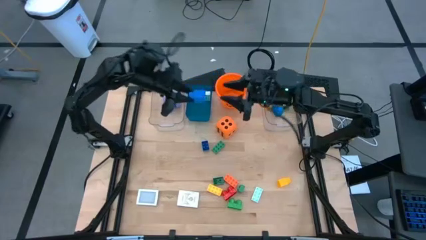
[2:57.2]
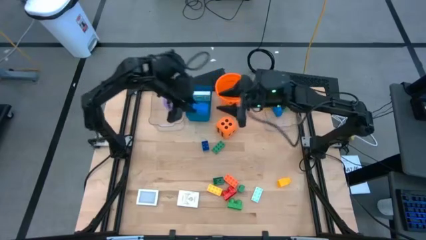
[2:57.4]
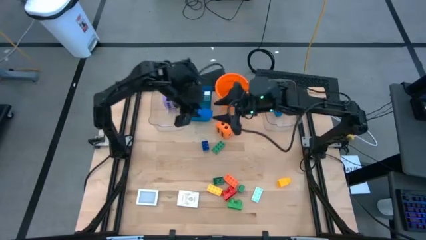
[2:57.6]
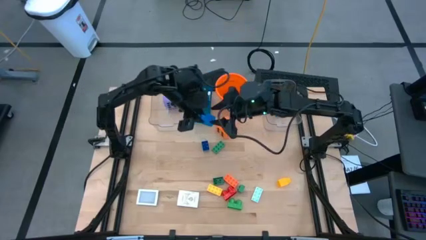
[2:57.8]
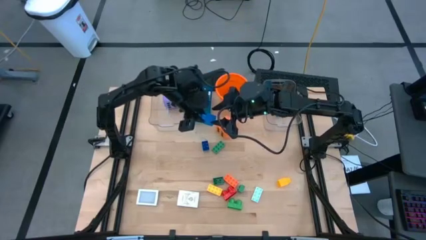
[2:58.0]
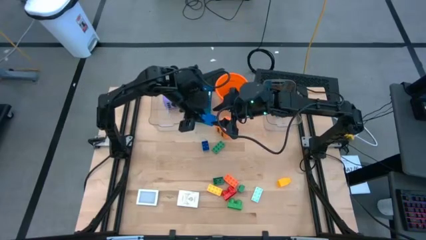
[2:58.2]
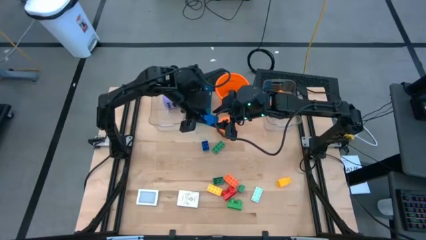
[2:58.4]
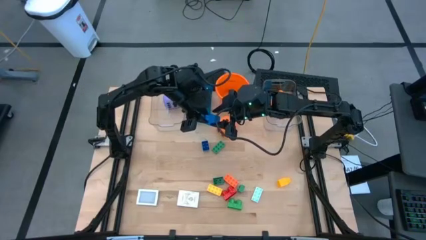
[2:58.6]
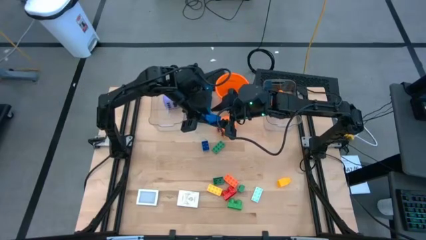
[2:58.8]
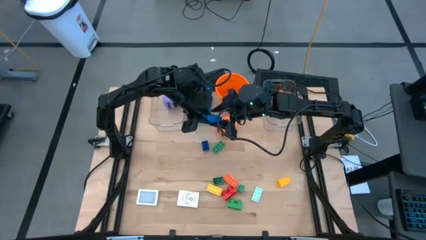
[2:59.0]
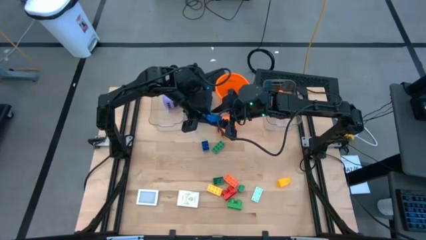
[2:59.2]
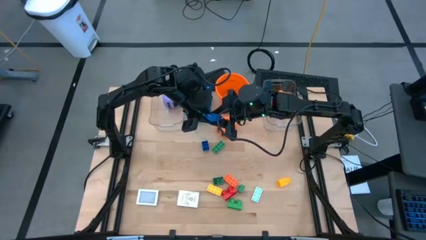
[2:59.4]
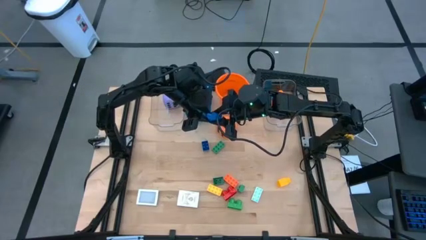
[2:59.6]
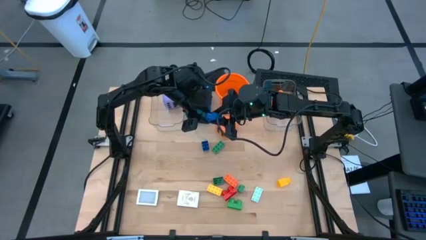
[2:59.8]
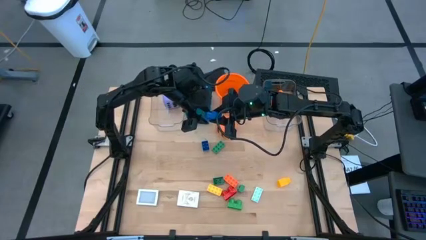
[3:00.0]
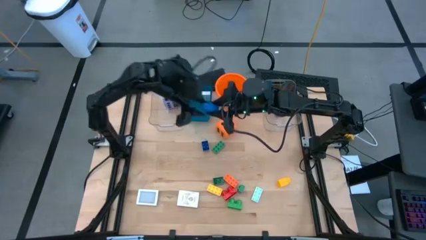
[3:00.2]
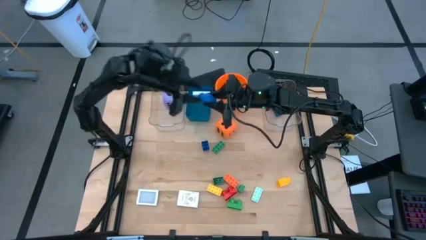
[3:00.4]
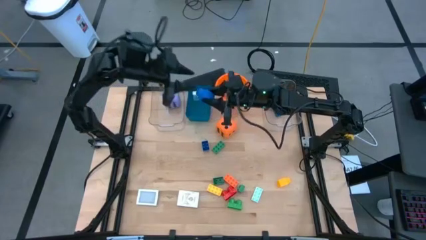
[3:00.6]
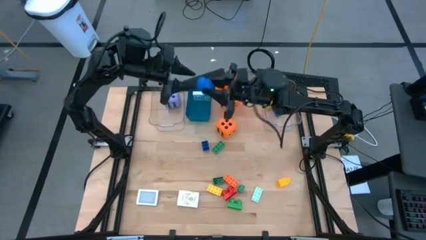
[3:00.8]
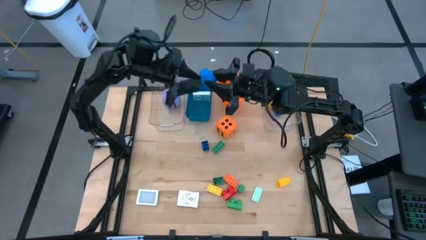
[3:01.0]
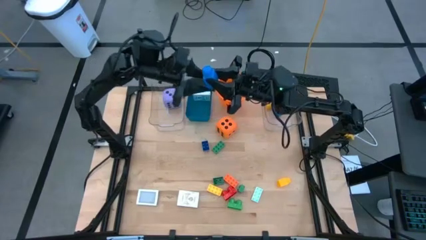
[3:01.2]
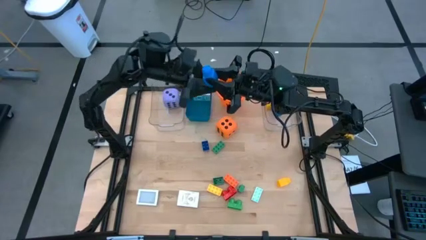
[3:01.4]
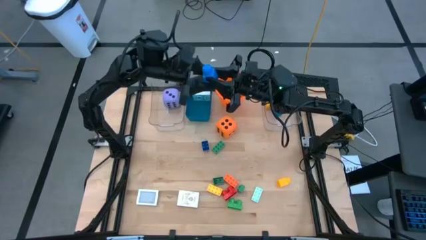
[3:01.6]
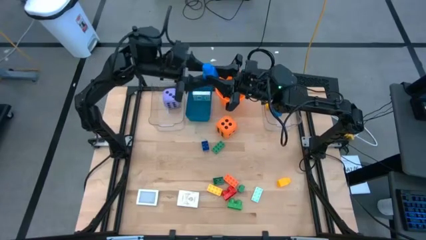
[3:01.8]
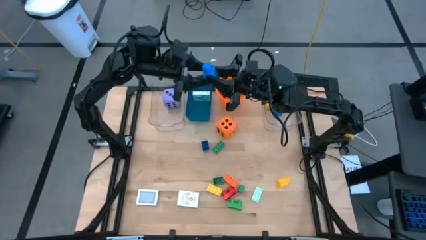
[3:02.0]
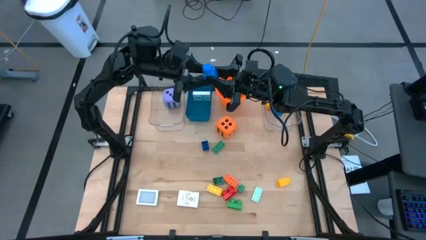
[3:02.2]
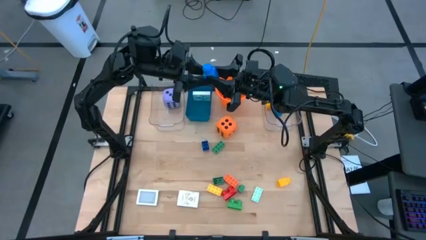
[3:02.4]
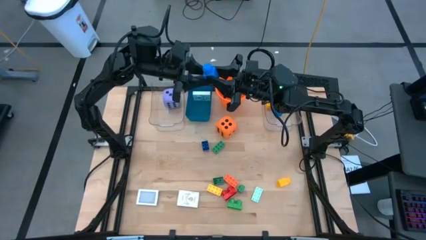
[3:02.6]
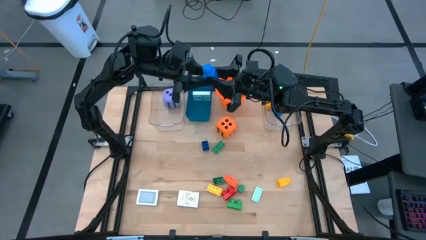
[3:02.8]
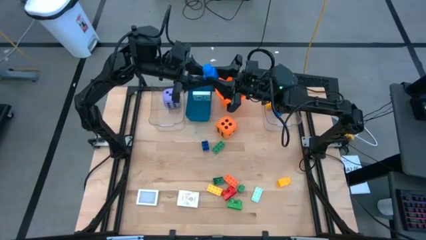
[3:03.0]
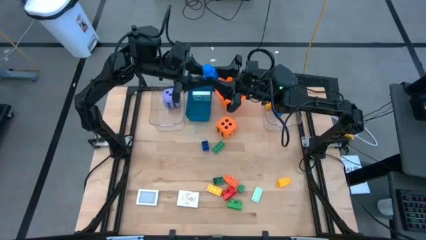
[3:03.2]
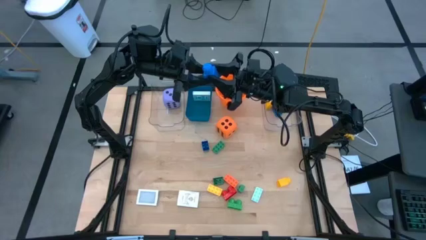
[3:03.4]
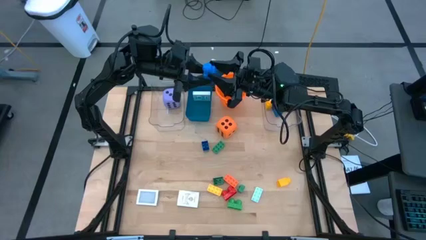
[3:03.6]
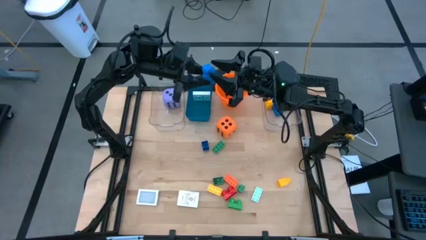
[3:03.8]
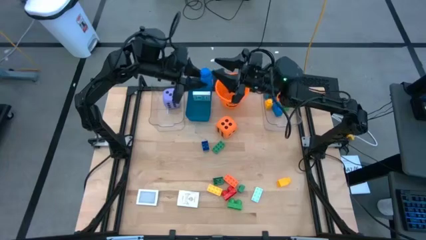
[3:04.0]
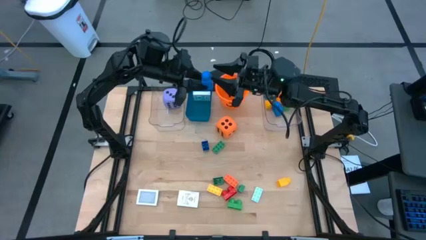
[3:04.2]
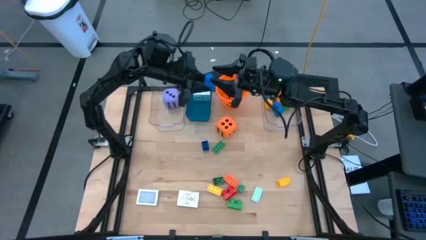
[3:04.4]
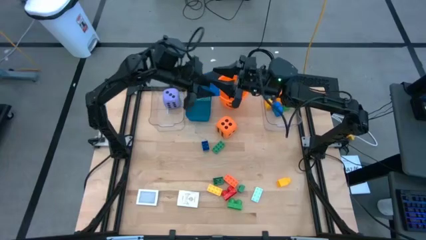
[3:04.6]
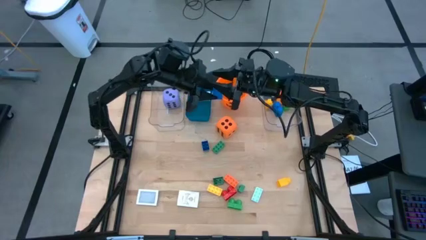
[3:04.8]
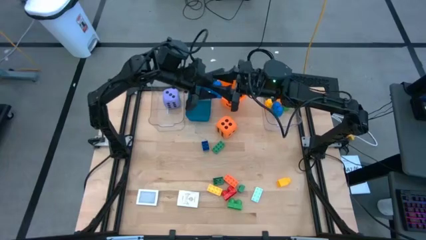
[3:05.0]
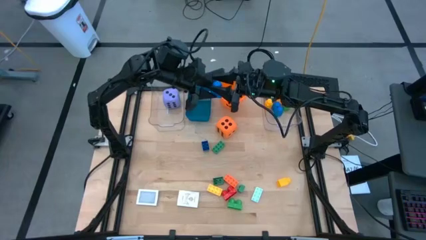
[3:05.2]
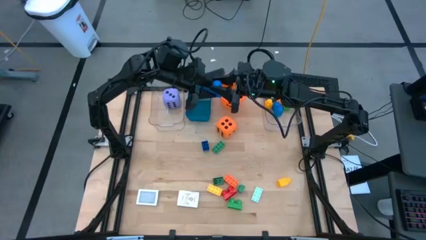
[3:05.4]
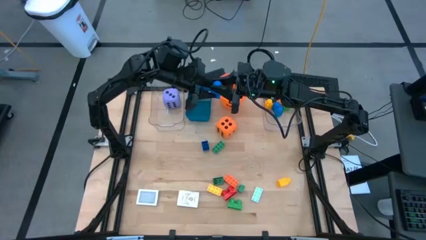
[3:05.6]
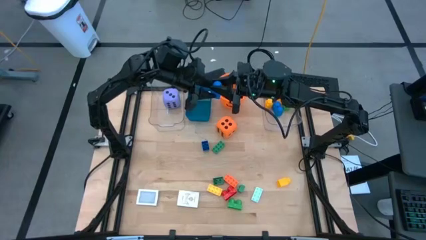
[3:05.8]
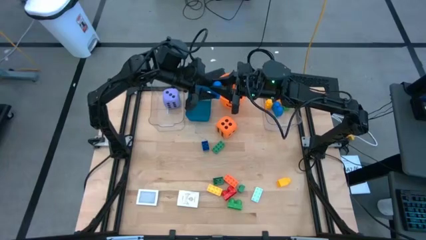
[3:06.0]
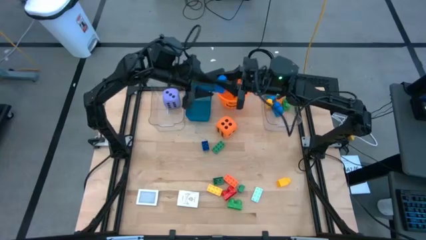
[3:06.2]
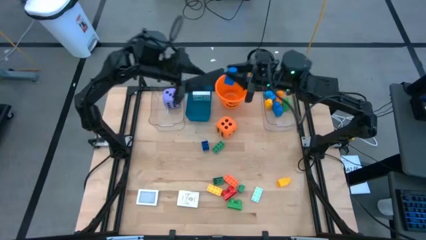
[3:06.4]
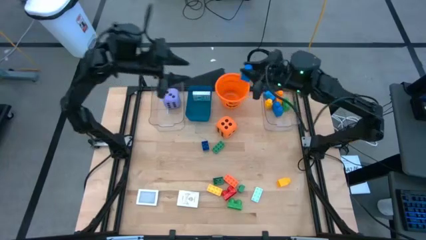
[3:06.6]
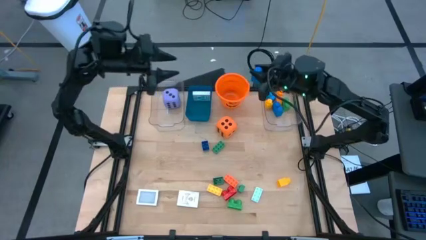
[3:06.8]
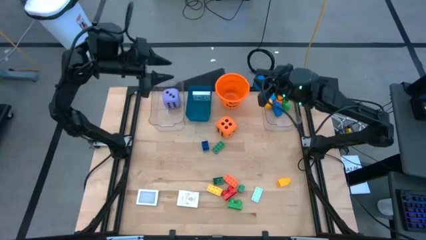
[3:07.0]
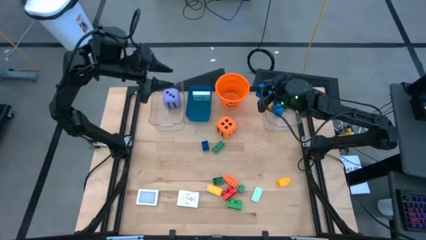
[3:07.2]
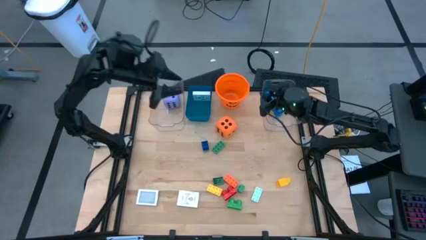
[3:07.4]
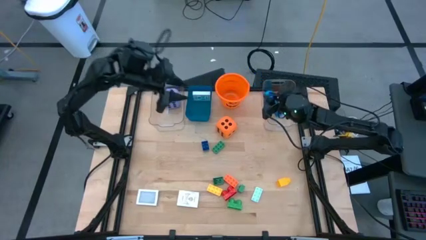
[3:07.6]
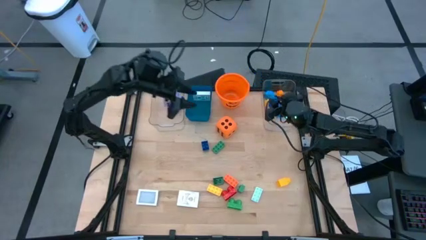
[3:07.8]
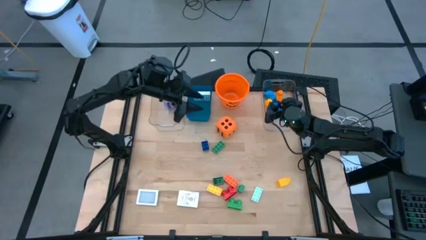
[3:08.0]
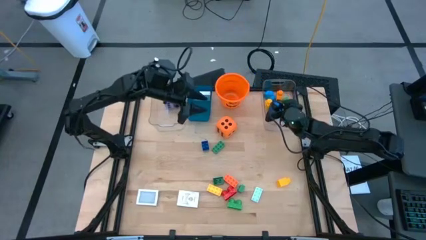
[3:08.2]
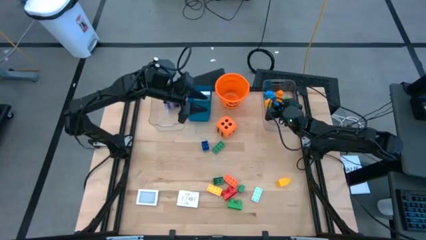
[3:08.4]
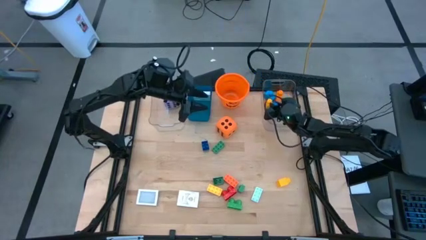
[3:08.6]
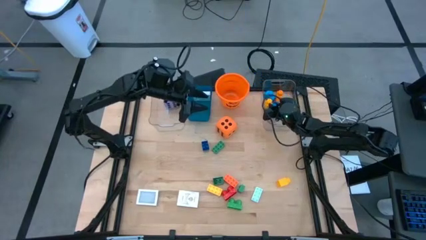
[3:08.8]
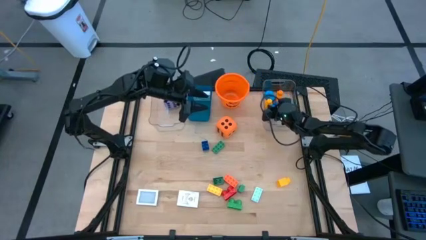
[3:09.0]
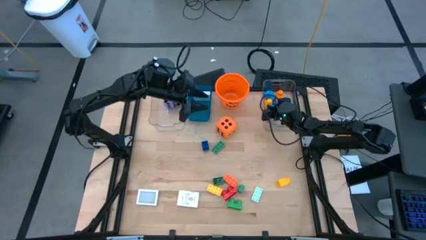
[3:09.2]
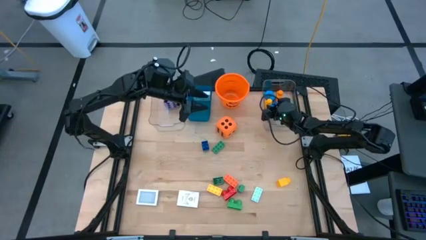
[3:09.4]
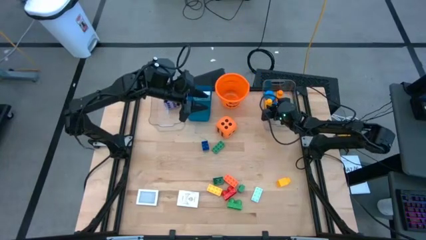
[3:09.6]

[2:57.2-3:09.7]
Task: Pick & Place Toys
Put the blue game piece into the right transparent bin

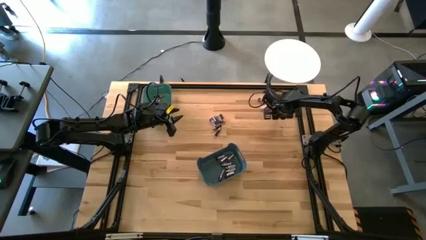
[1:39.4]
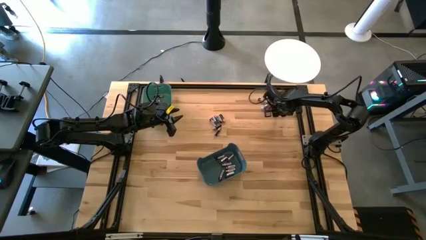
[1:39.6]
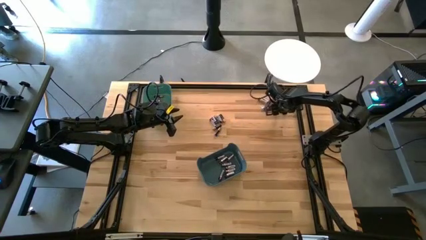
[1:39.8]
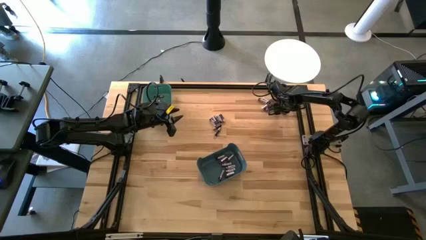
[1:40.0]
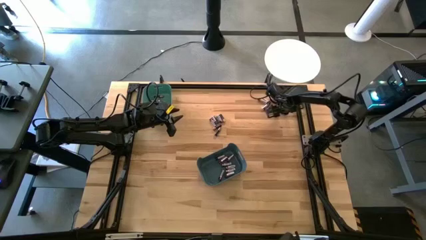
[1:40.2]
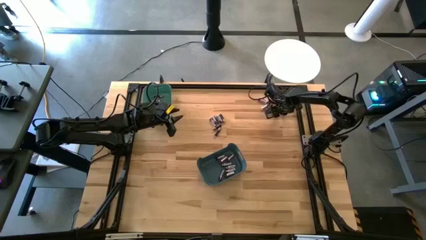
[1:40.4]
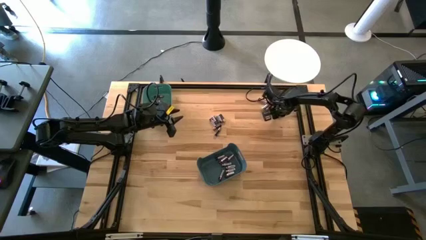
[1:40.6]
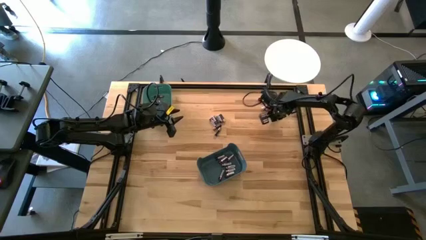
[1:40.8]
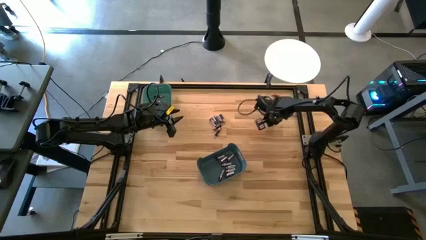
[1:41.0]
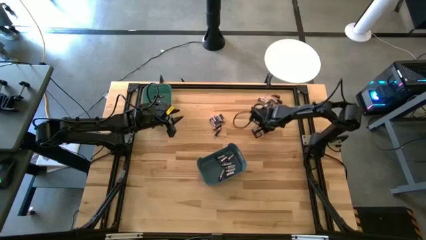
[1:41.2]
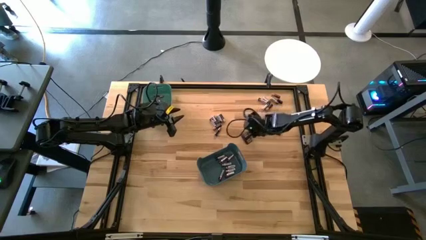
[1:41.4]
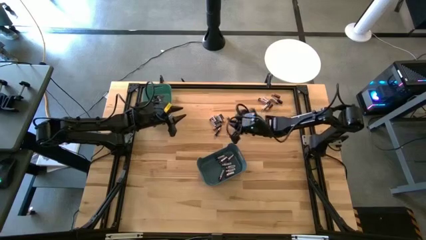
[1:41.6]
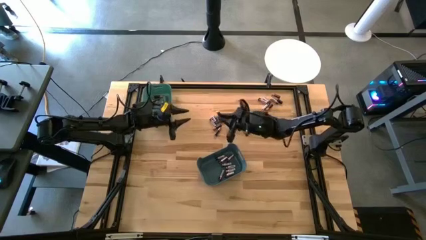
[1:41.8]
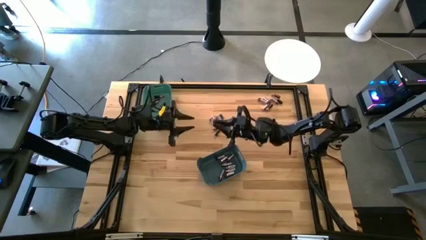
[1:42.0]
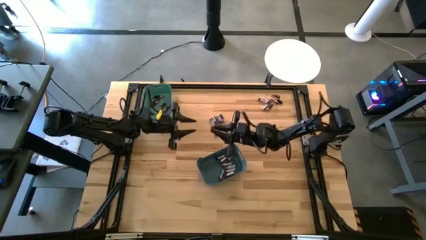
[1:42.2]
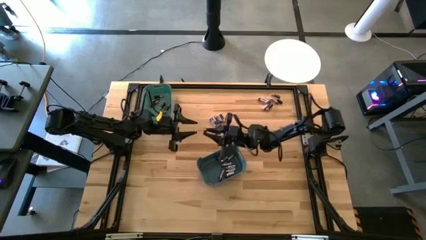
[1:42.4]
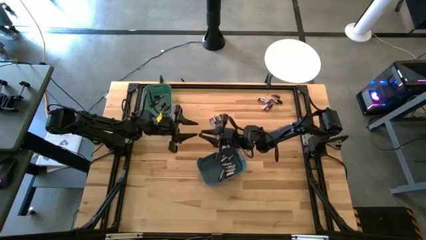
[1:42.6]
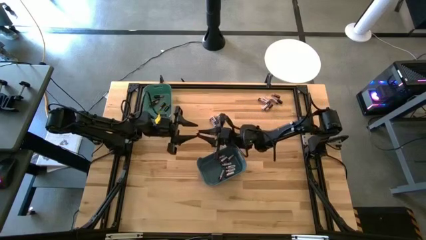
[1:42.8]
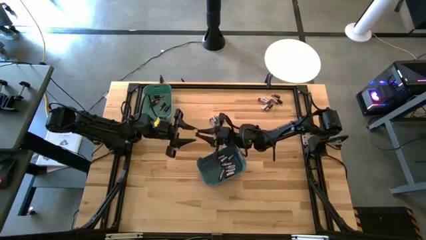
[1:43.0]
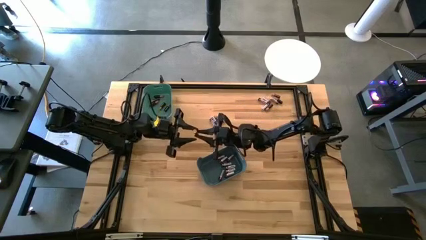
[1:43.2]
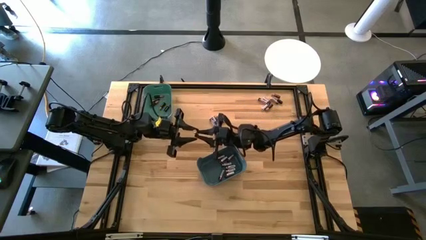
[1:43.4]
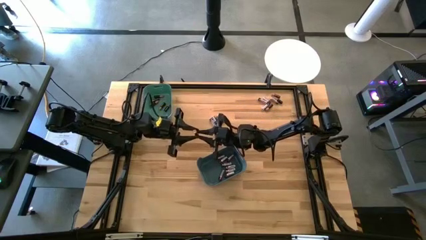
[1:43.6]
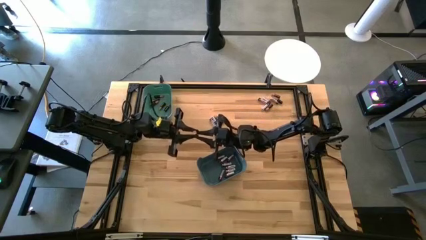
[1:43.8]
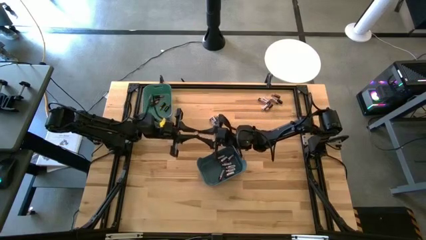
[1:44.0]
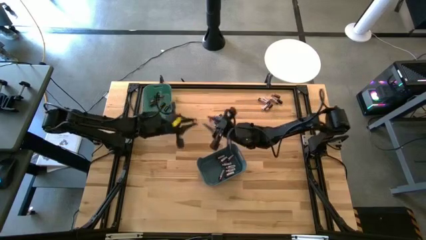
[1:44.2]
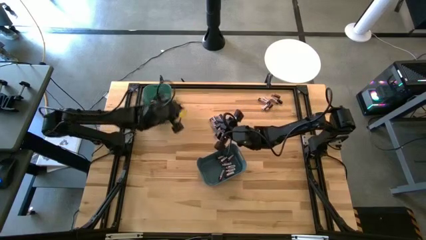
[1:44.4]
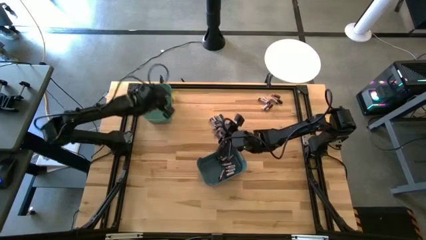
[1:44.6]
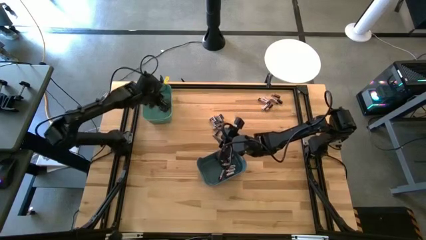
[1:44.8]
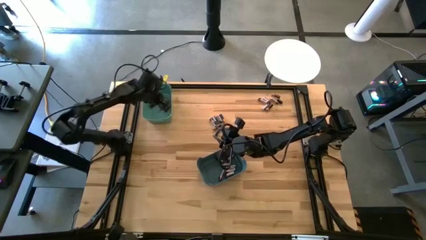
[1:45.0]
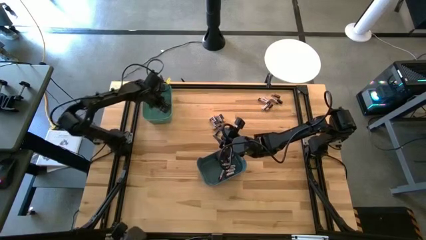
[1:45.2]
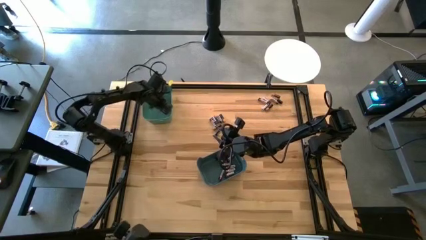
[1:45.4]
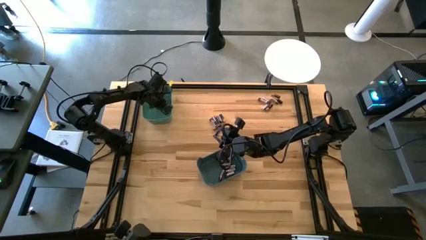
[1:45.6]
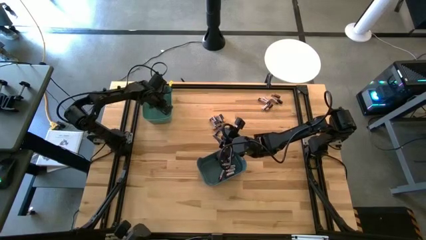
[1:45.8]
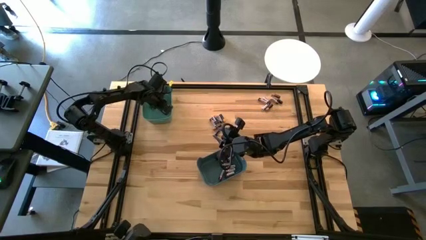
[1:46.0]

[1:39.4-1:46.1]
Task: Sort batteries
Put the black battery into the green bin
